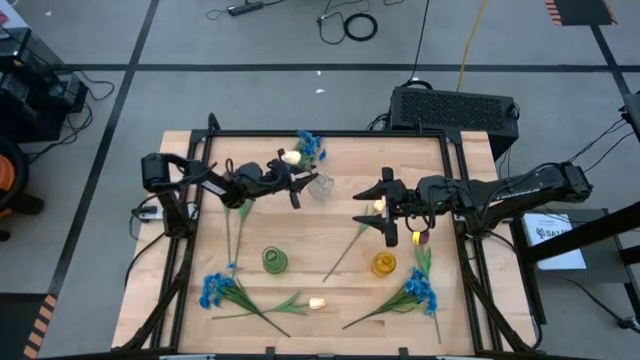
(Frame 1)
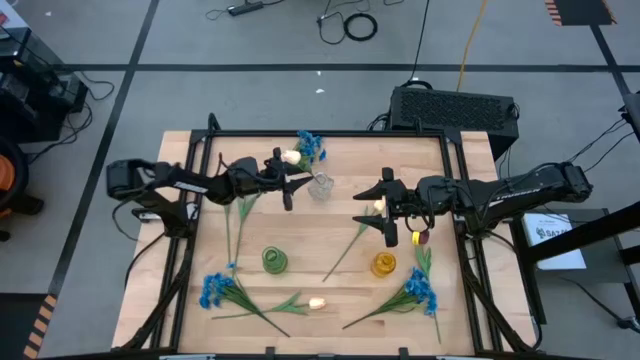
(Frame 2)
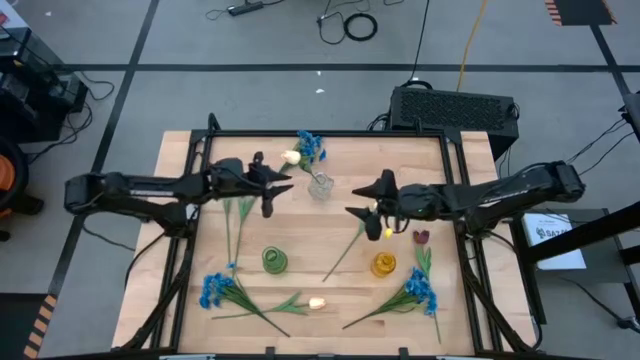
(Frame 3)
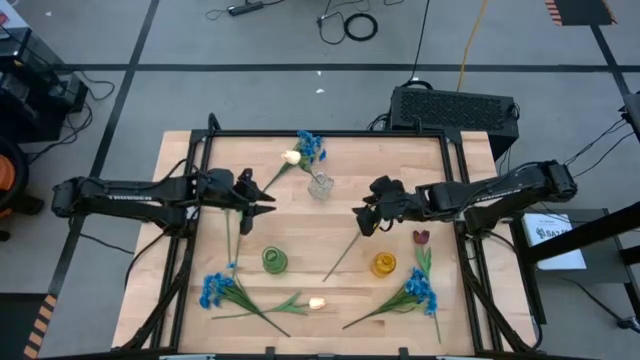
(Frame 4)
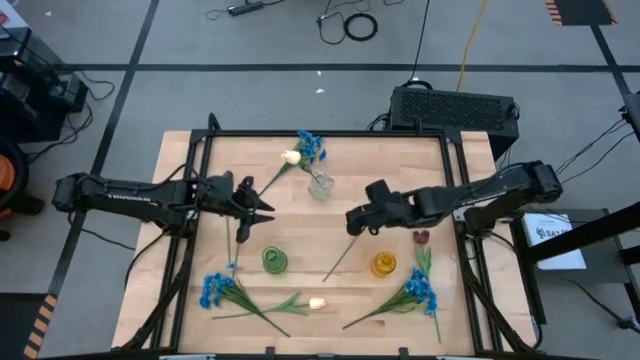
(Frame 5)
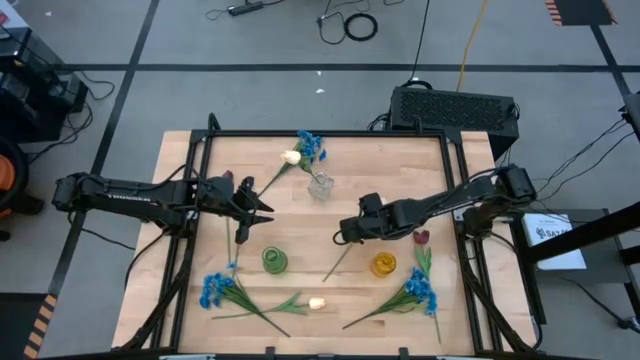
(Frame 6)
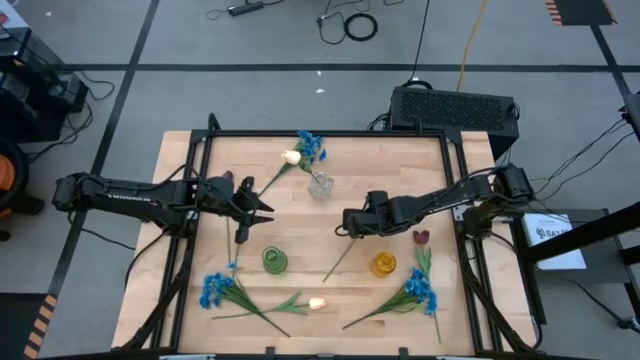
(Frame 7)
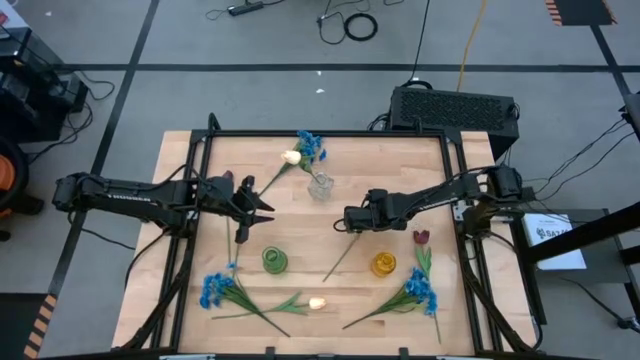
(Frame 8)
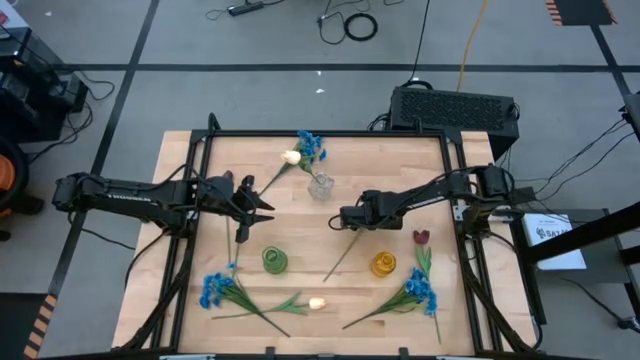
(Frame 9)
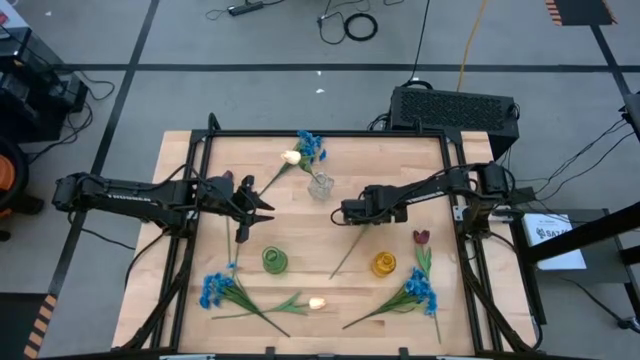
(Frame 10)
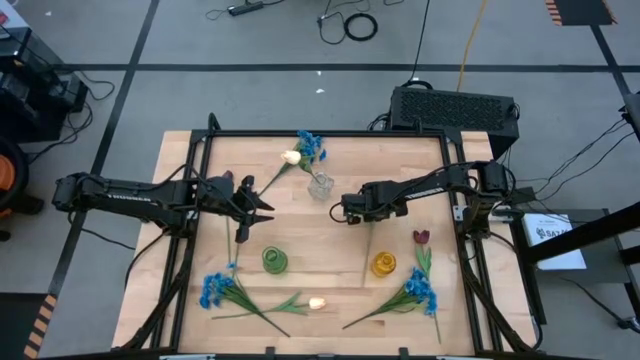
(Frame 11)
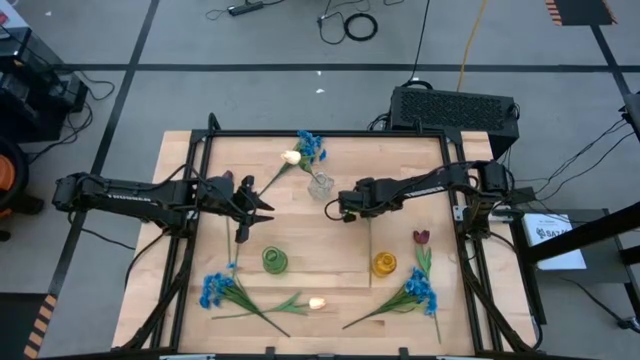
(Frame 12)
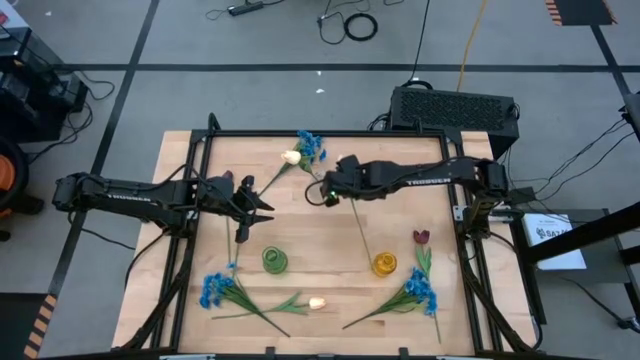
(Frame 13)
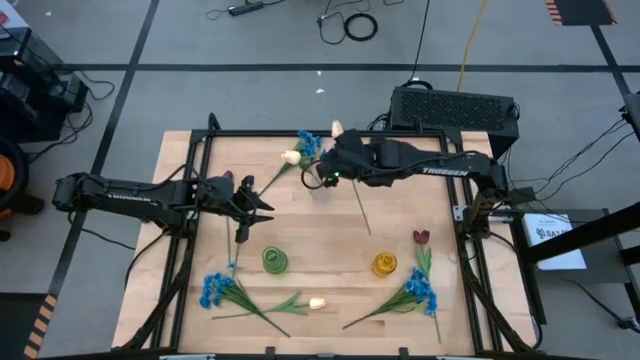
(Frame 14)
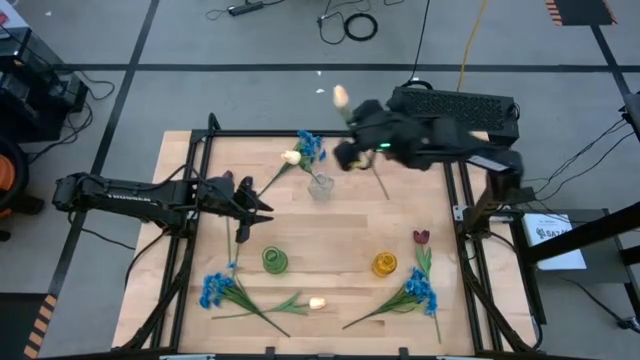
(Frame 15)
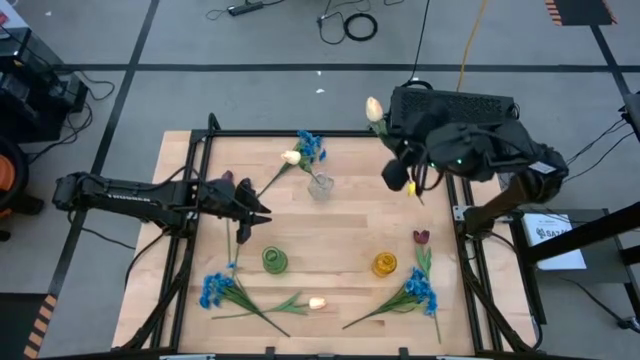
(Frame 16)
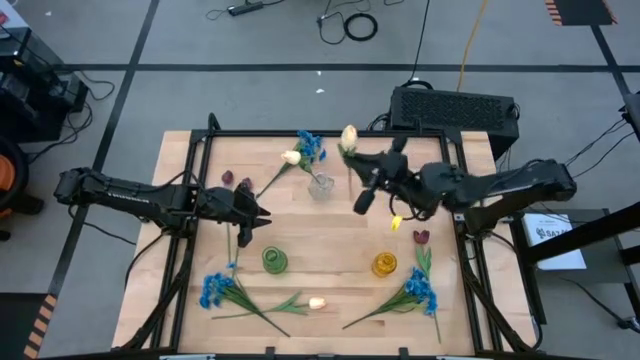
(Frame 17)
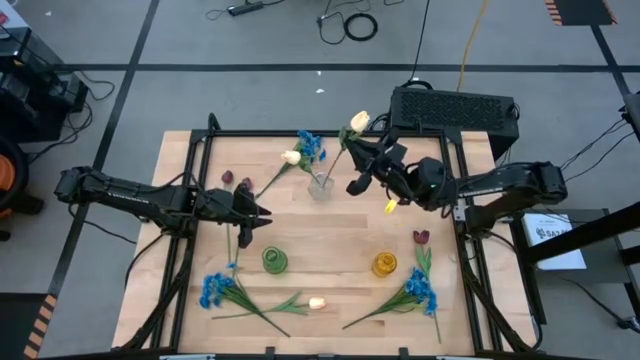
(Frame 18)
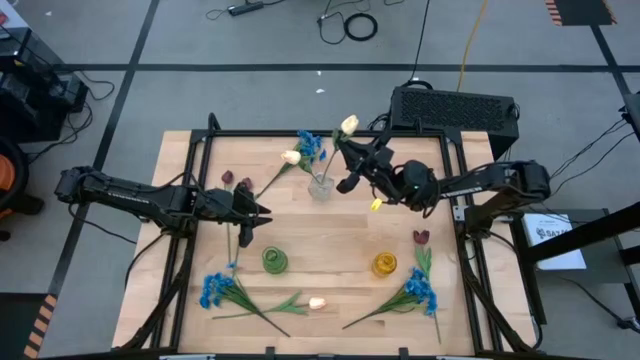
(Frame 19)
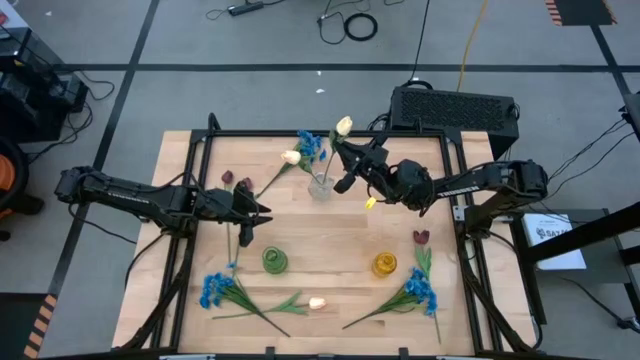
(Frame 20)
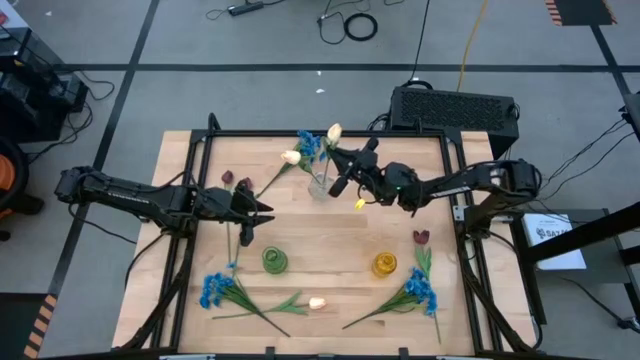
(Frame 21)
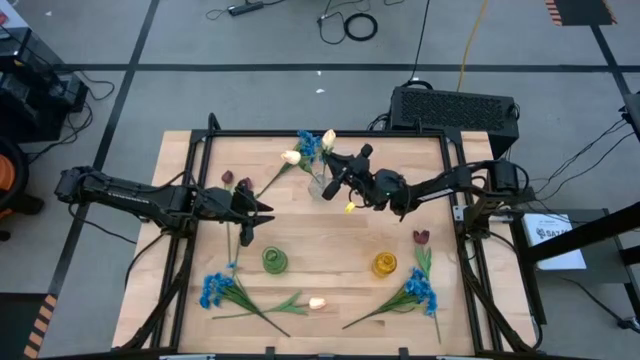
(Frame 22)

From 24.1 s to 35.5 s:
Task: Sort flowers into vase by color
Put the top pink flower into the transparent vase

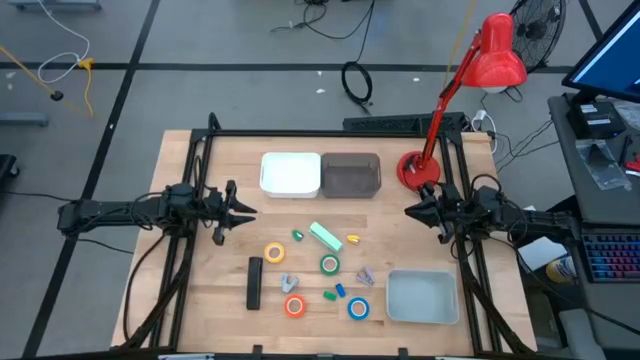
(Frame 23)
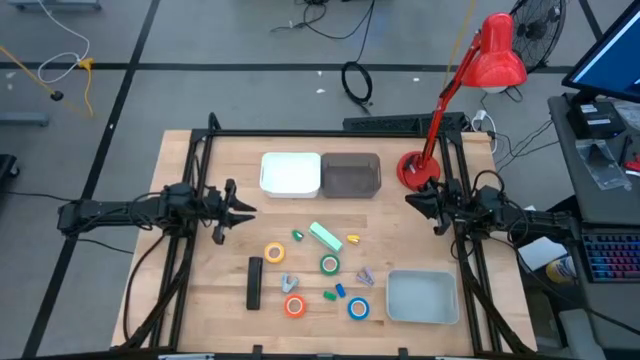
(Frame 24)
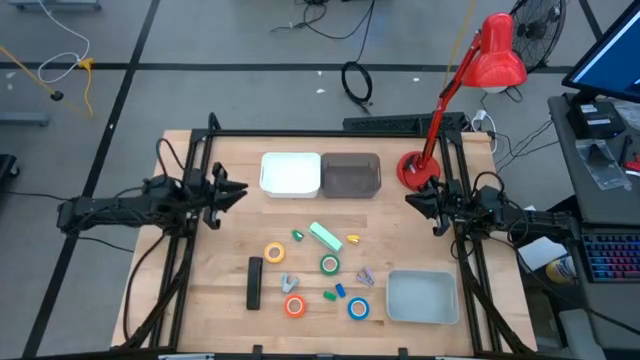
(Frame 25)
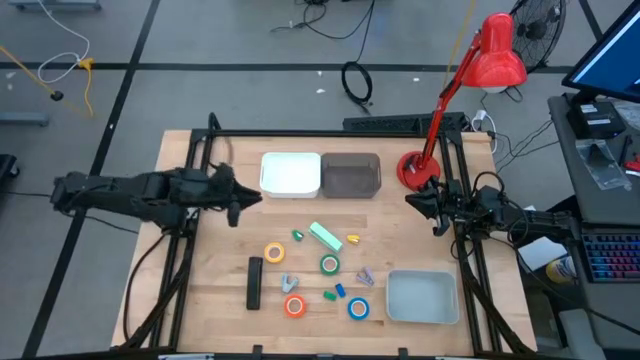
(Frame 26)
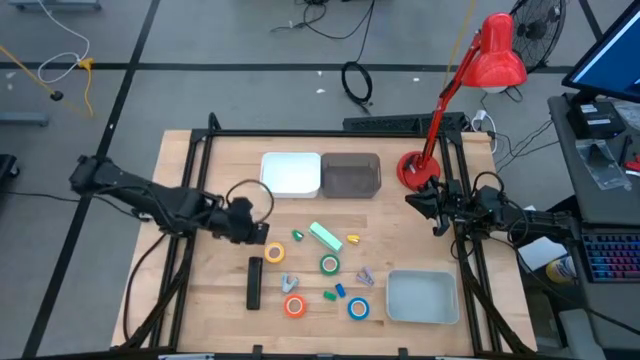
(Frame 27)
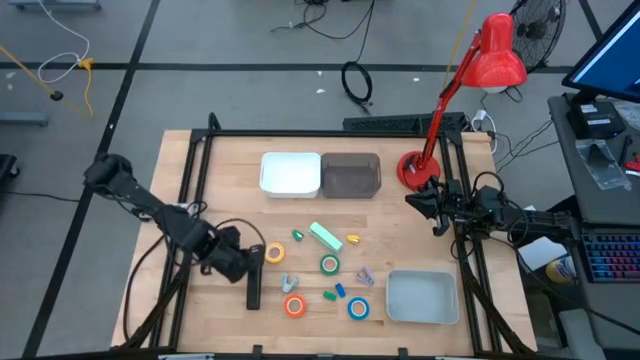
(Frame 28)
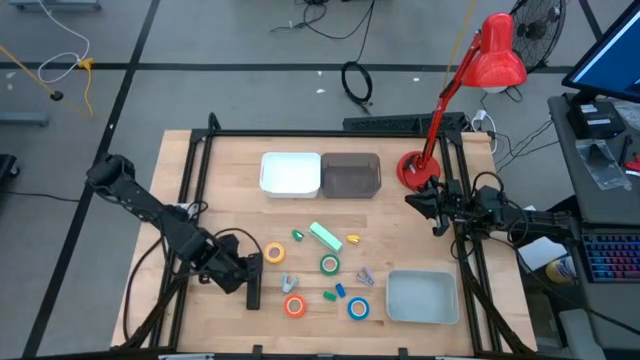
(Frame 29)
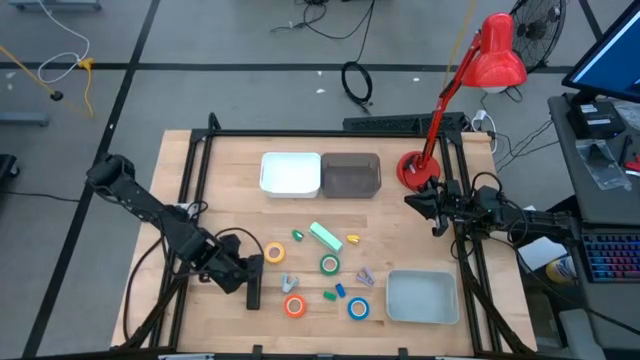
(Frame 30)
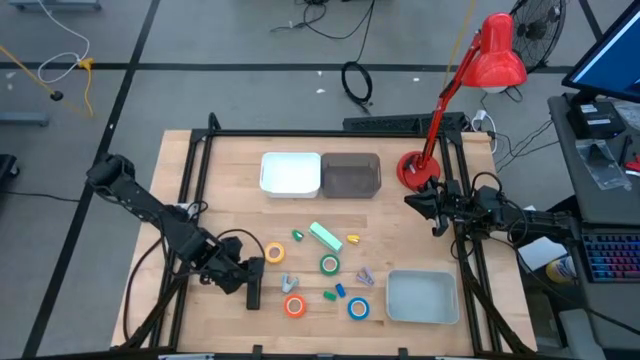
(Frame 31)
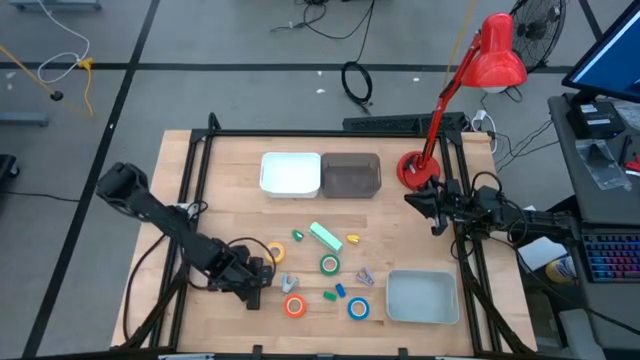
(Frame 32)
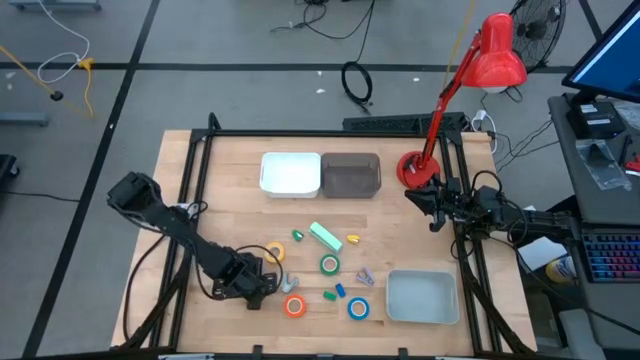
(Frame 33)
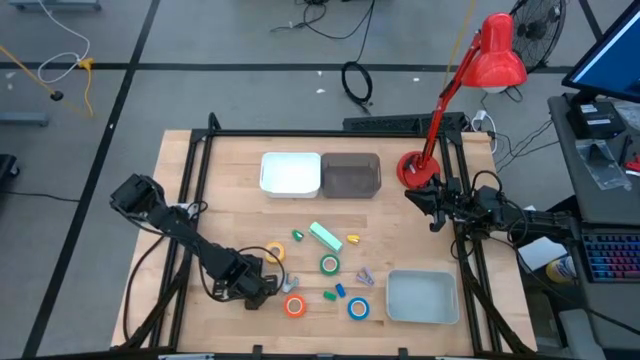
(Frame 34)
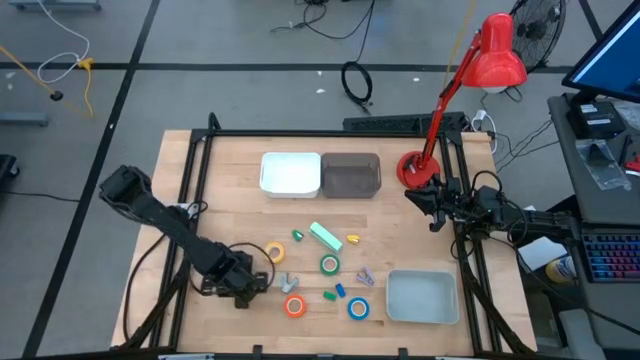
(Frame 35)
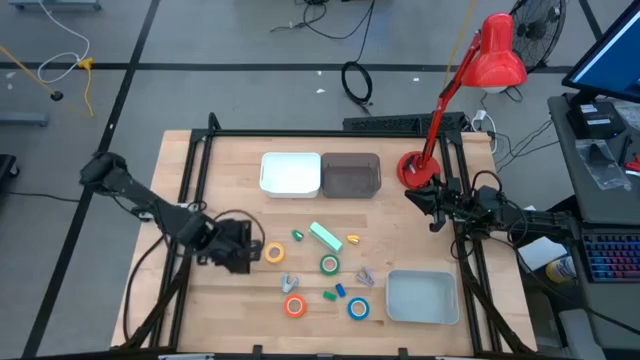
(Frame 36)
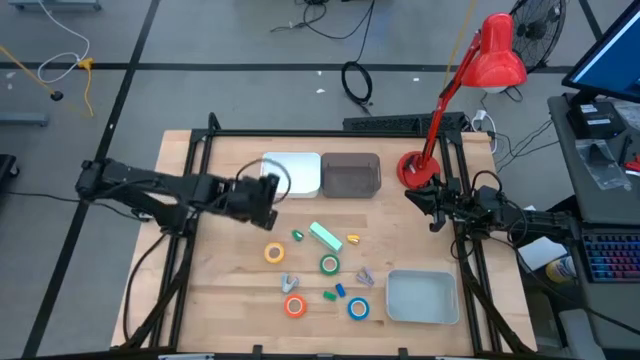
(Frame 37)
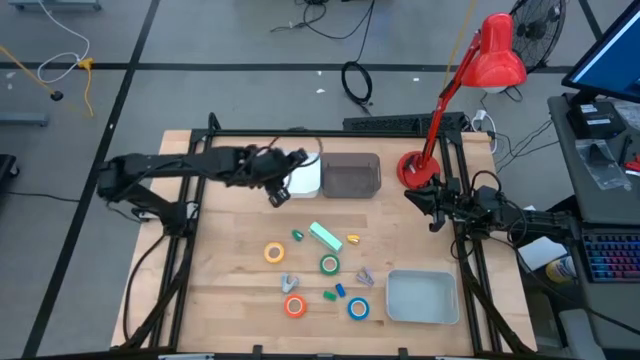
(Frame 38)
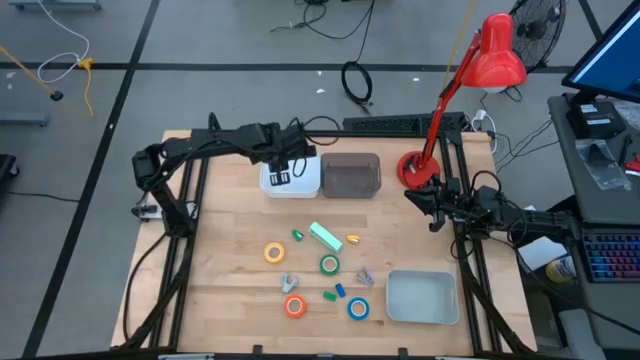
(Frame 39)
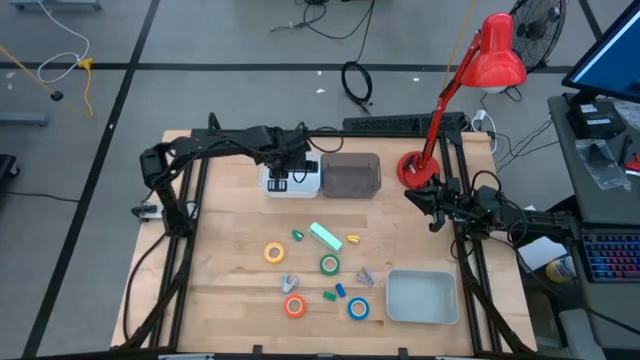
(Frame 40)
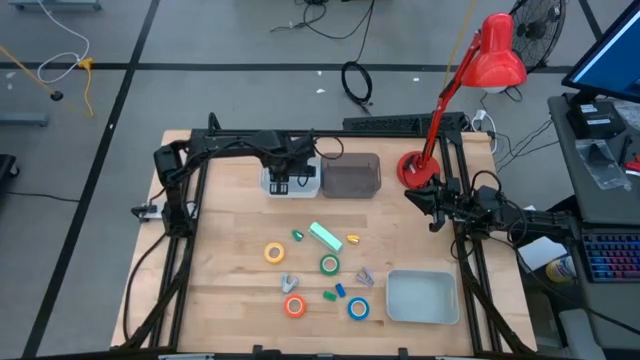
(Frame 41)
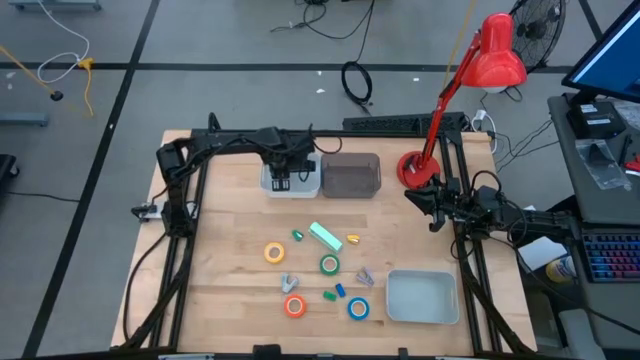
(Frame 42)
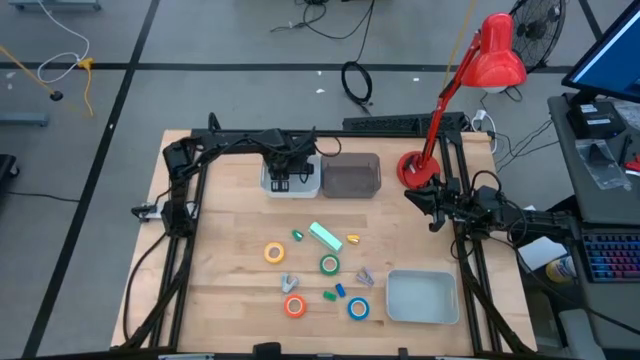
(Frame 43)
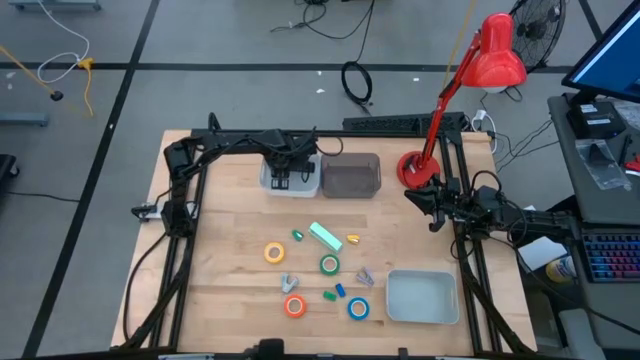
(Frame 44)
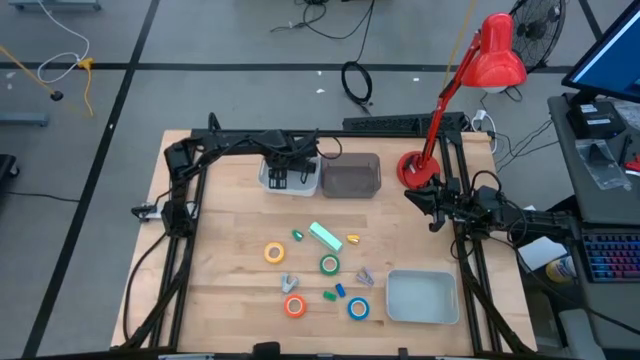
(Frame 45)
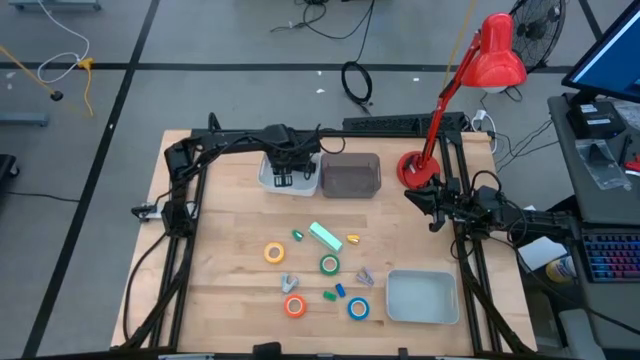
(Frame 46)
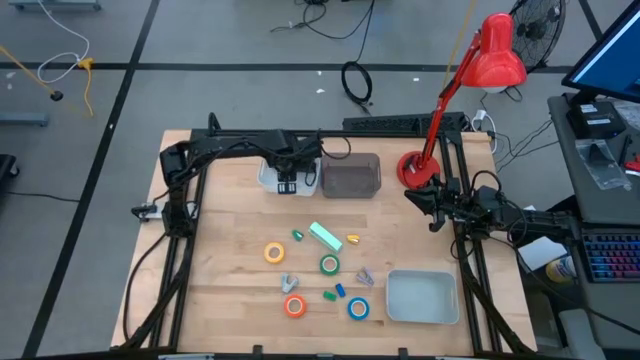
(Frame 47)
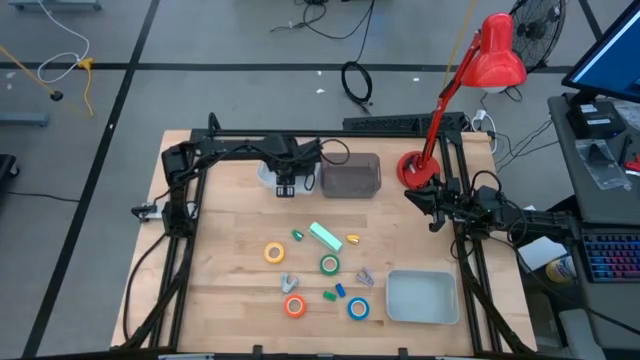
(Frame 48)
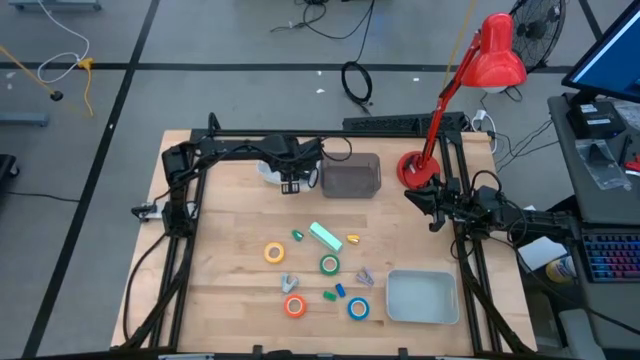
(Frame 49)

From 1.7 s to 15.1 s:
Task: Pick and place Stapler, Stapler remover, tape
Put the large black stapler into the white bin
